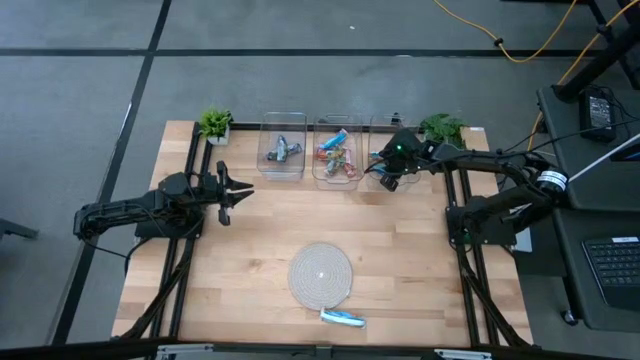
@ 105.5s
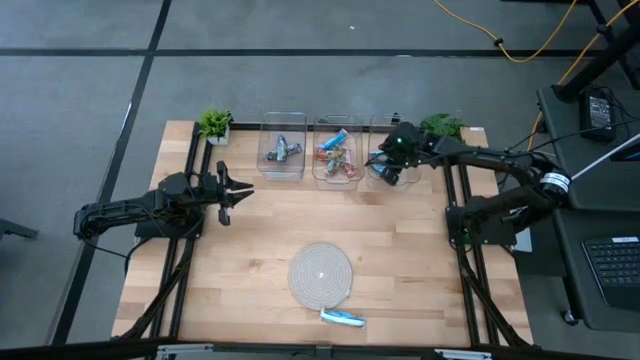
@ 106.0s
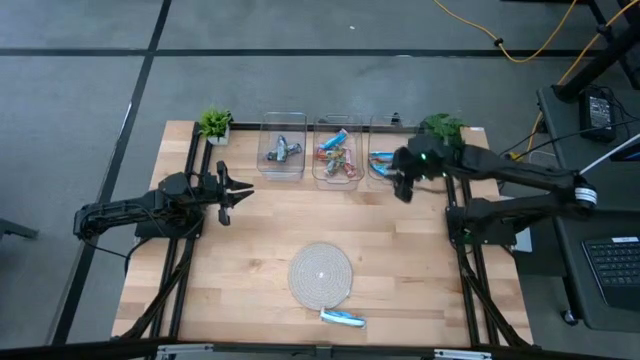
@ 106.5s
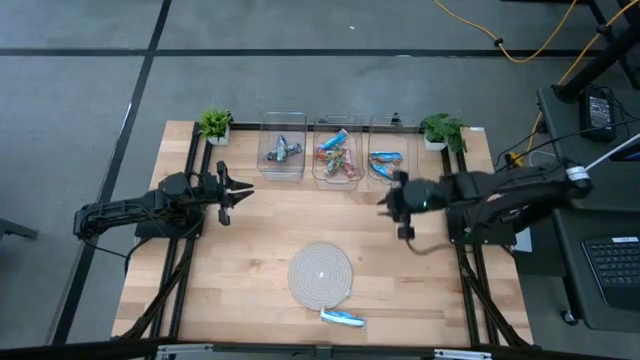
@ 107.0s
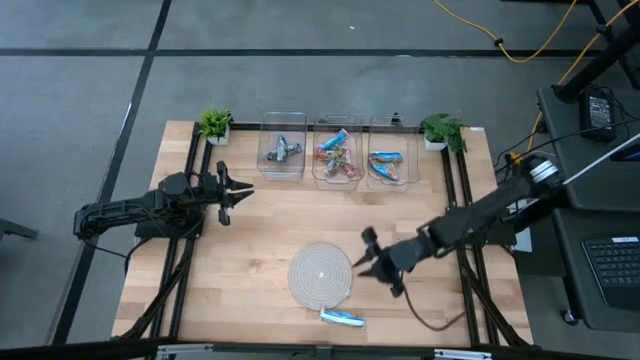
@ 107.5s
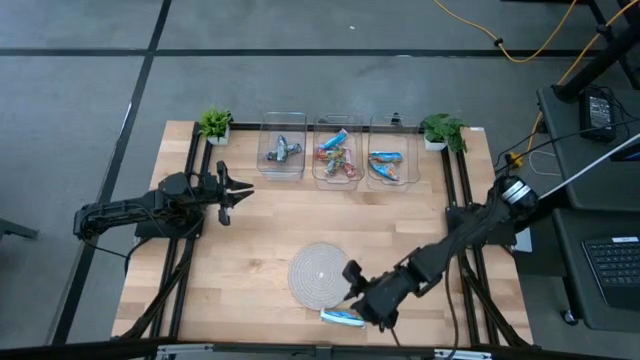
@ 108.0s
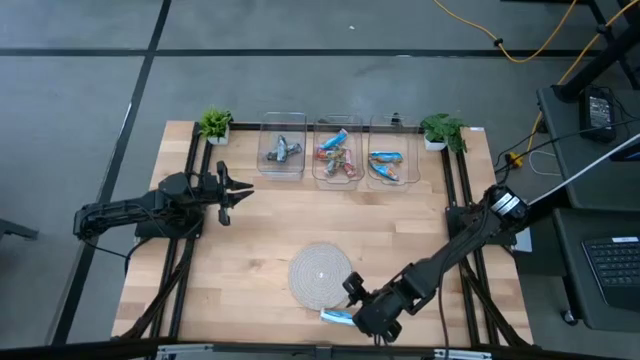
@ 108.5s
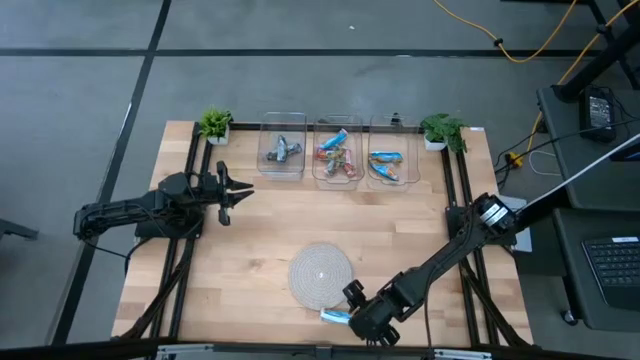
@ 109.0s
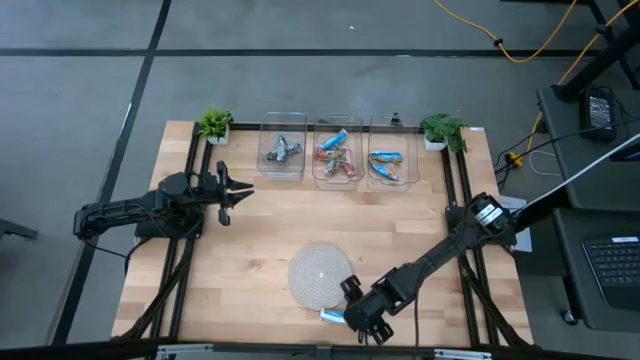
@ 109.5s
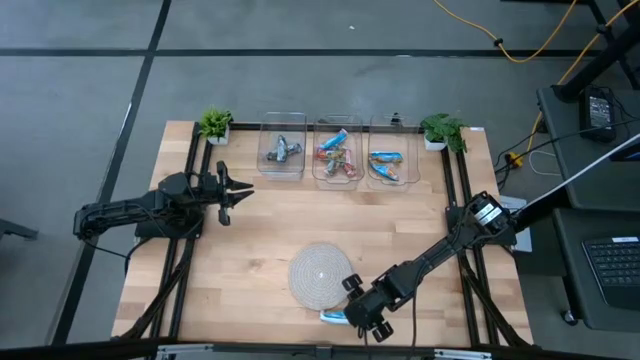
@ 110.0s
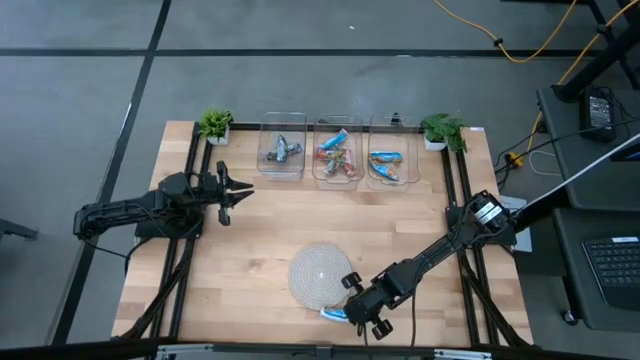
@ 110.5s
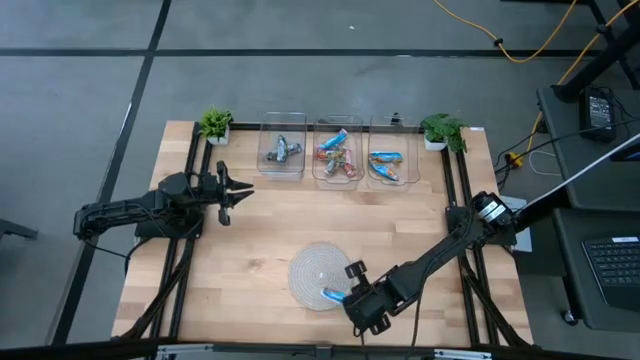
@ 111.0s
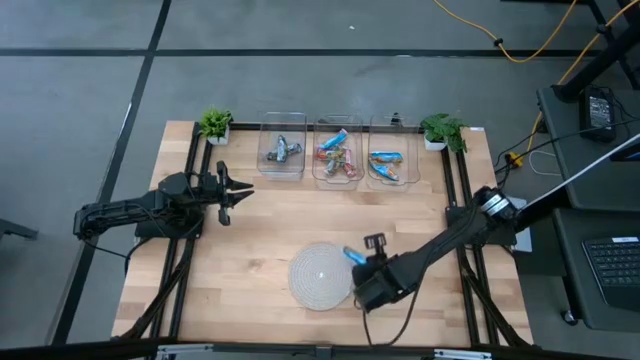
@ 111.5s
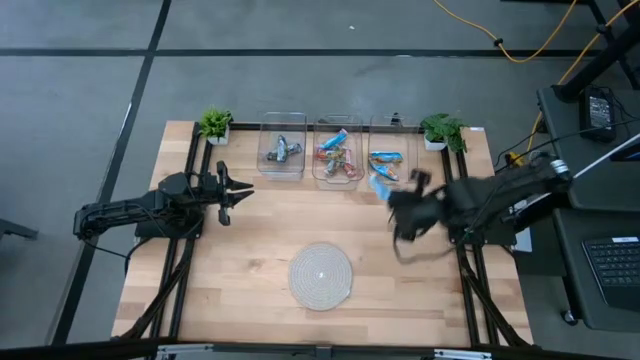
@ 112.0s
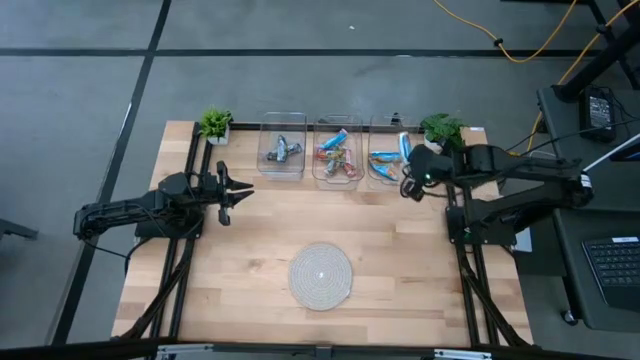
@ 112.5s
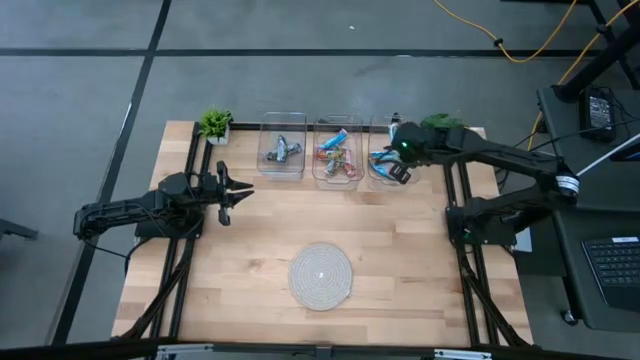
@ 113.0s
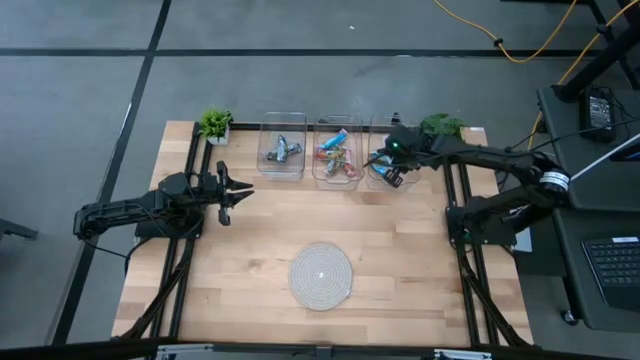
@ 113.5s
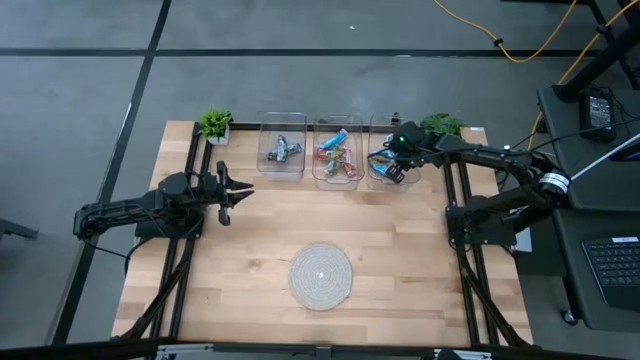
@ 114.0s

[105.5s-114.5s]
Task: Pick and place Granola Bars by type
Put the orange granola bar into the right transparent bin

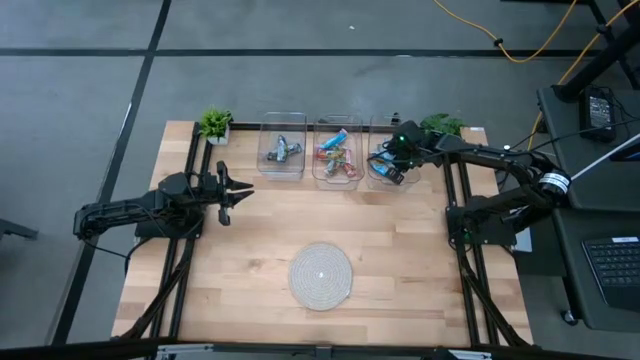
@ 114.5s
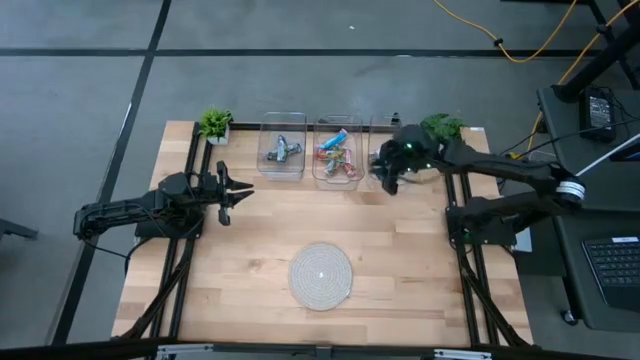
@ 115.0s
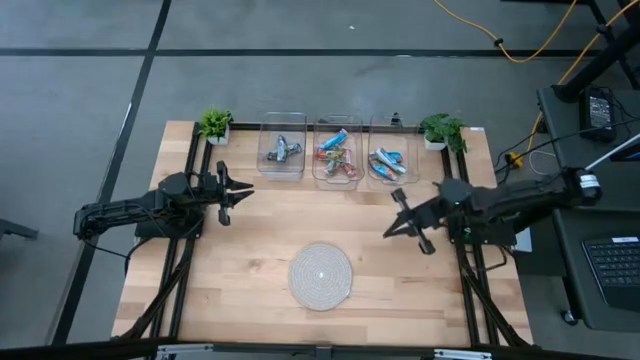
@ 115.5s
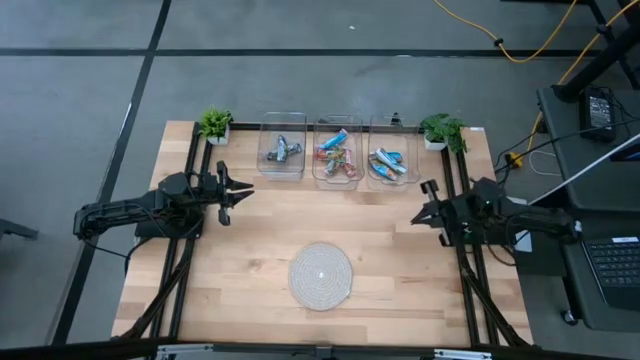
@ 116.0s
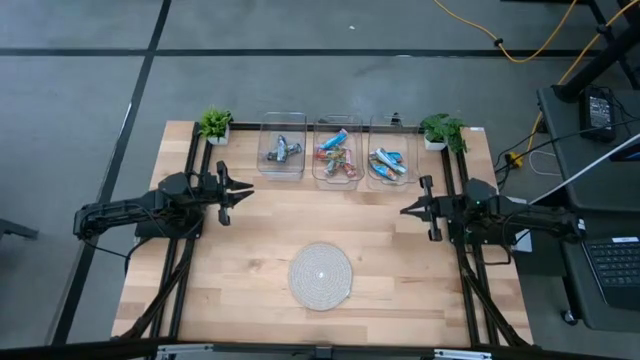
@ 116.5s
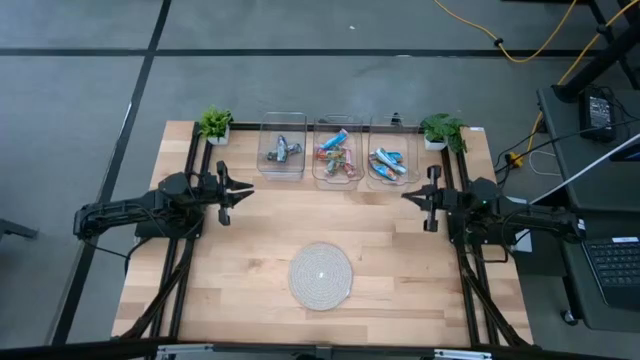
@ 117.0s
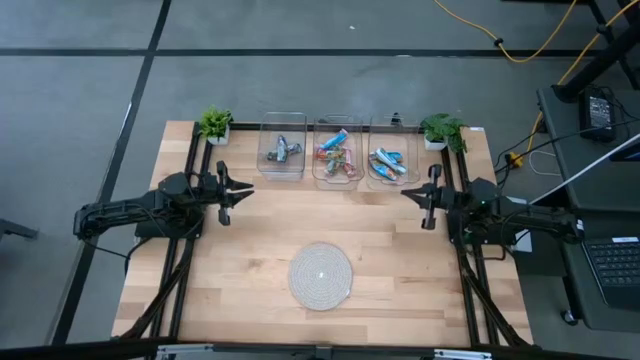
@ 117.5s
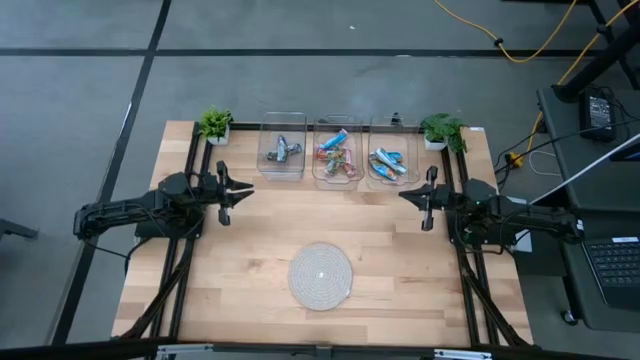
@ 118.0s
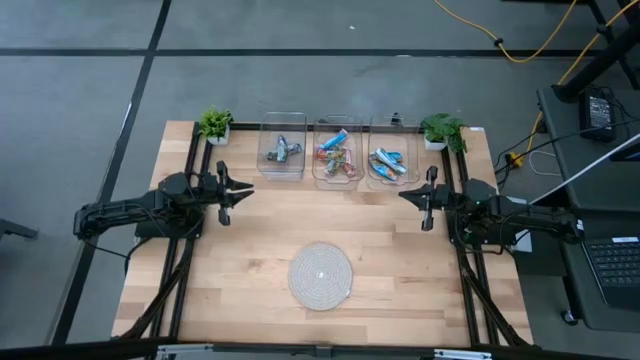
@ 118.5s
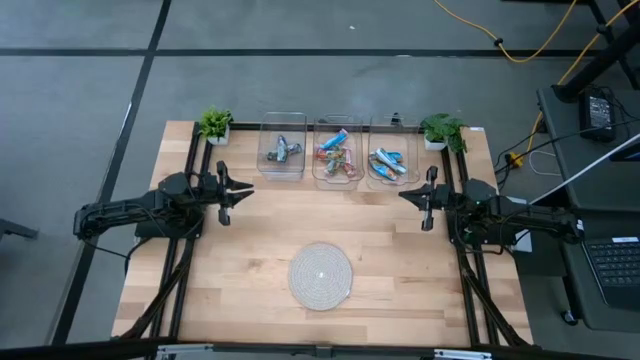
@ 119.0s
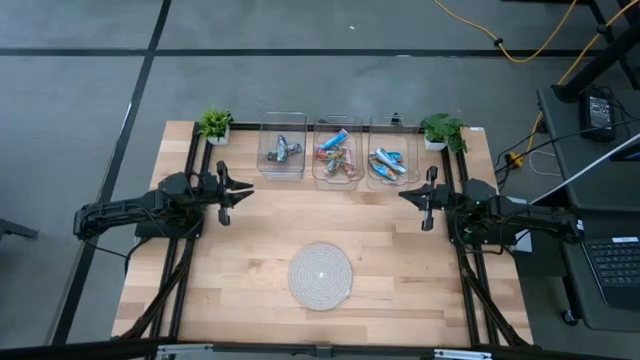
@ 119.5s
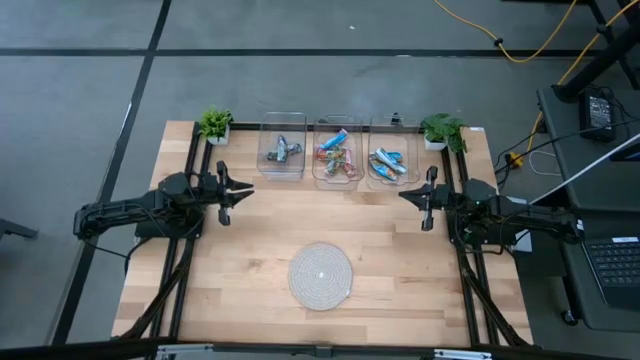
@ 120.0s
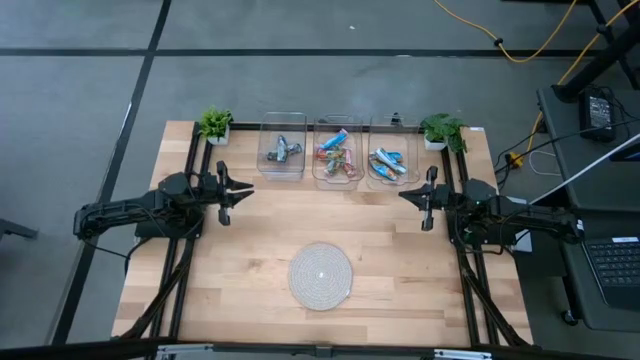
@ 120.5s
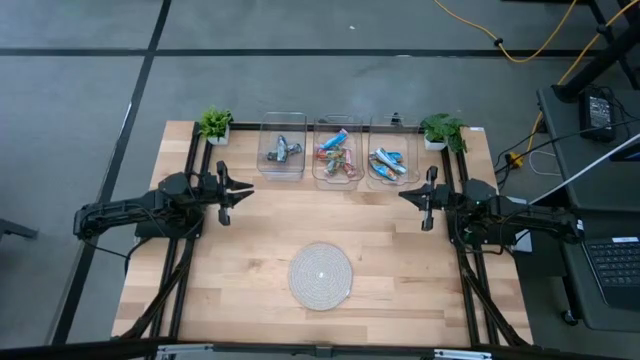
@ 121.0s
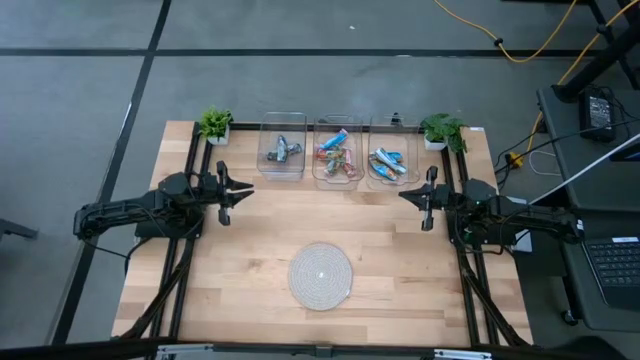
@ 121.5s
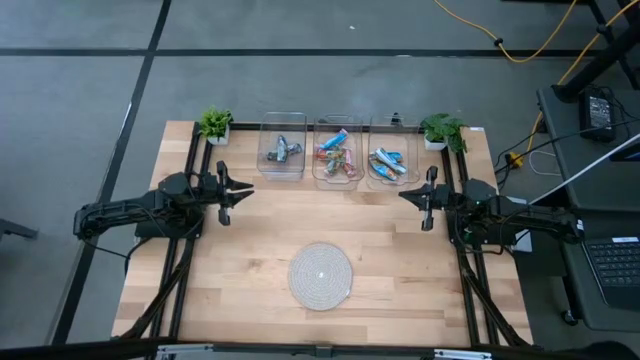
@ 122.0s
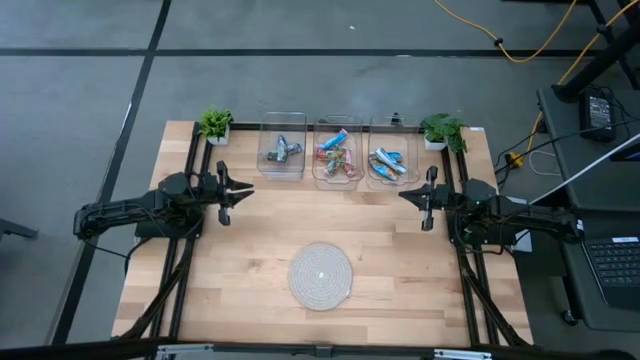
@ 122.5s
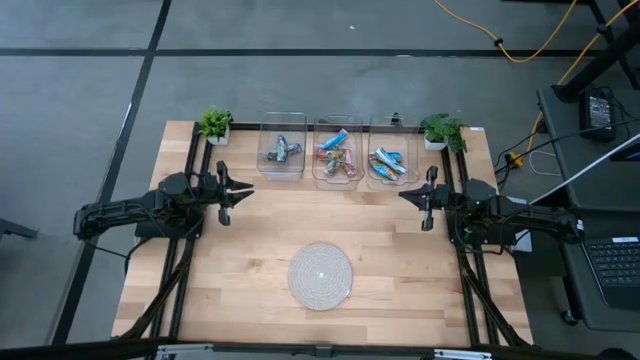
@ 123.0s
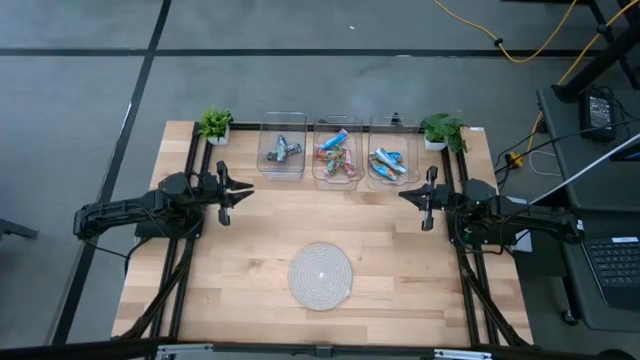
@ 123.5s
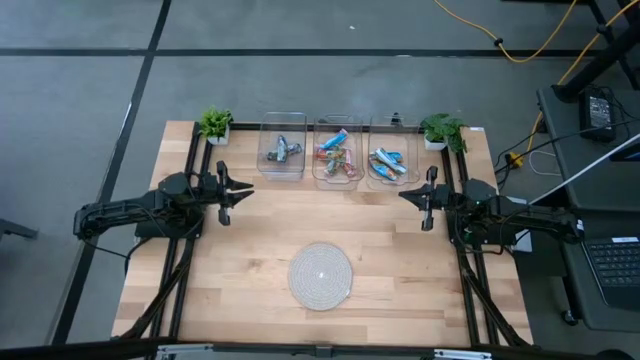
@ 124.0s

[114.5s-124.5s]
Return to Home Position

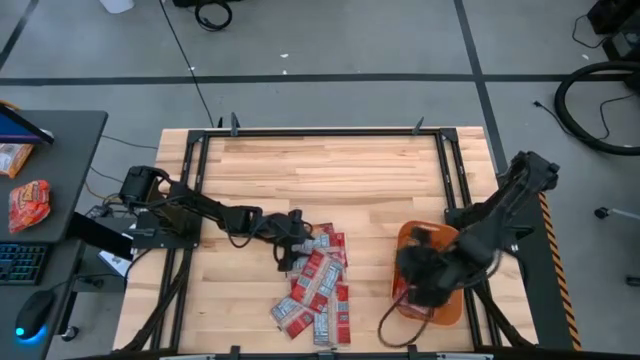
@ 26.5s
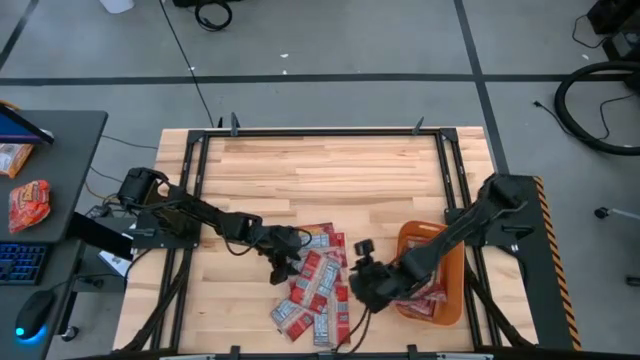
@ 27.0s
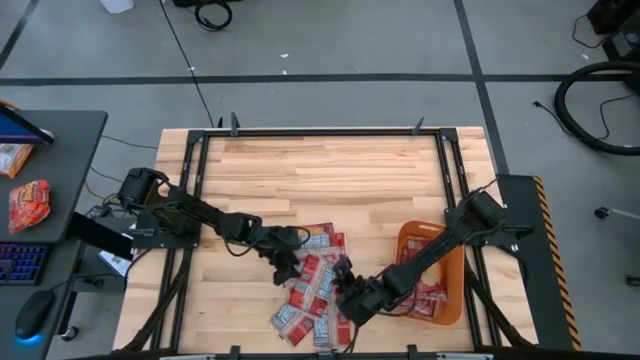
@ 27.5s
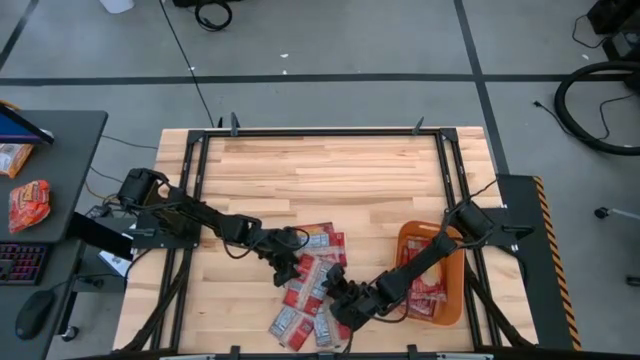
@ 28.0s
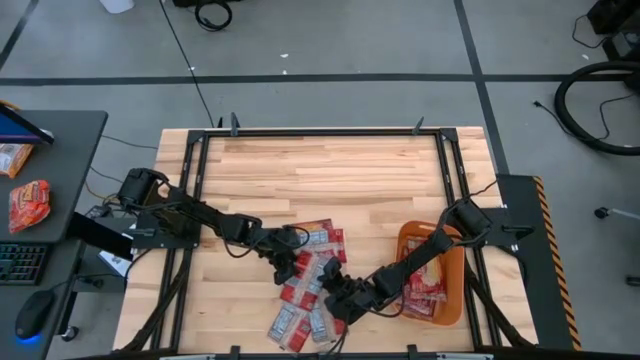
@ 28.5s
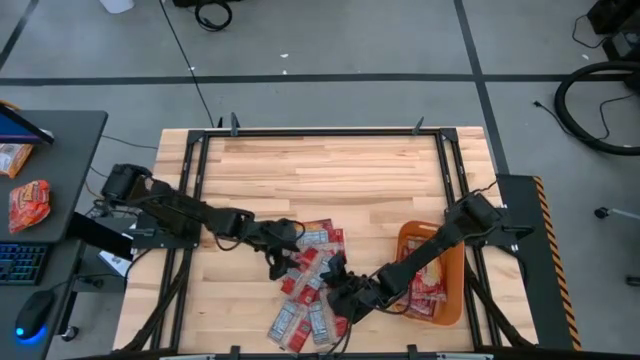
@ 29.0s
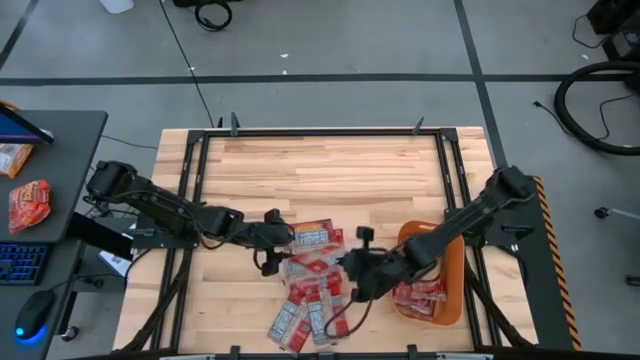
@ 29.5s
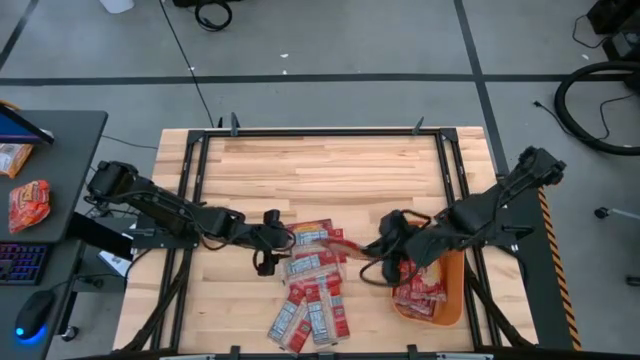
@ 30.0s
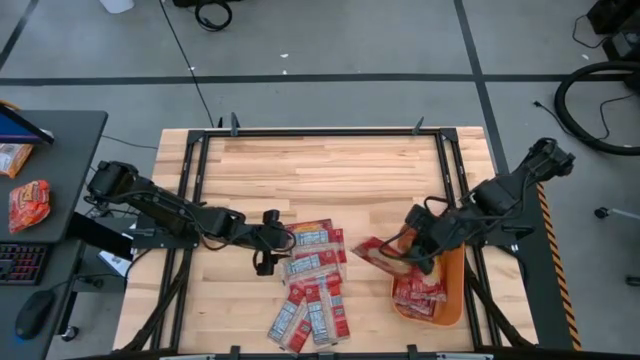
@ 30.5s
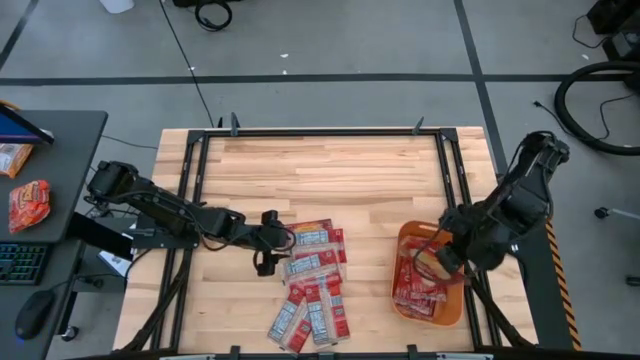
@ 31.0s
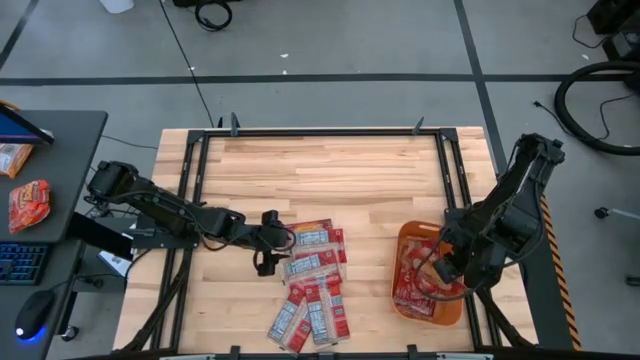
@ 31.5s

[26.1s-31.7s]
Task: Sort popcorn bags into baskets
Put the red popcorn bag into the orange bin
